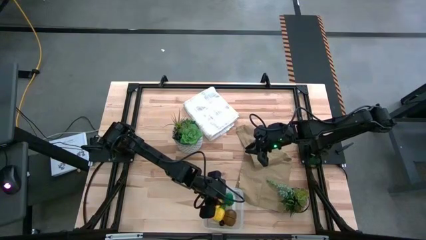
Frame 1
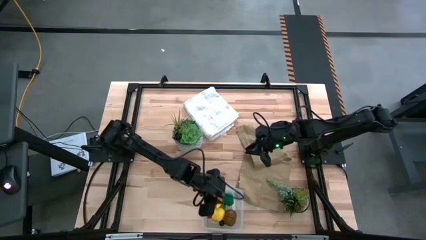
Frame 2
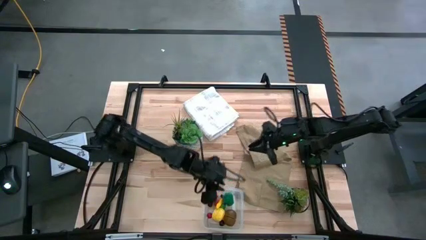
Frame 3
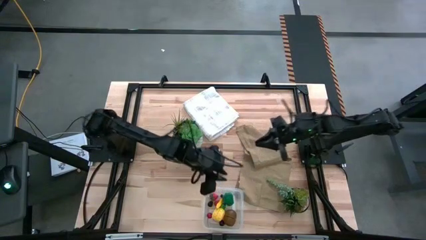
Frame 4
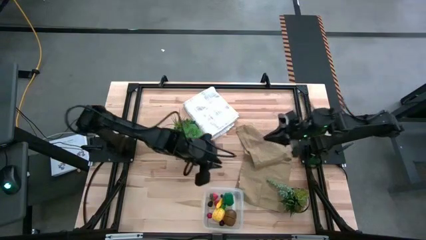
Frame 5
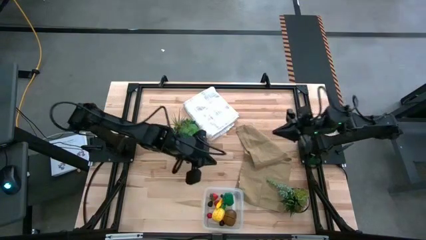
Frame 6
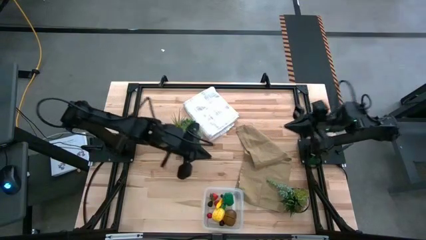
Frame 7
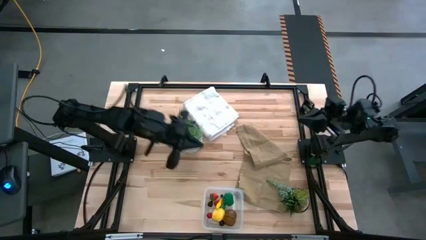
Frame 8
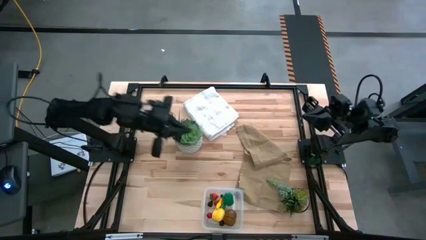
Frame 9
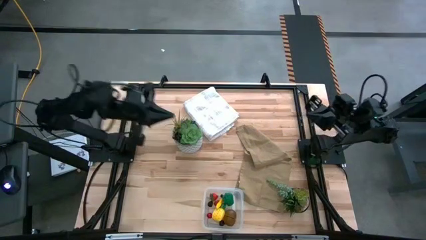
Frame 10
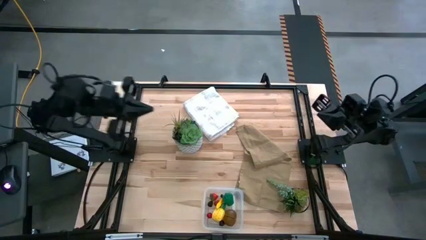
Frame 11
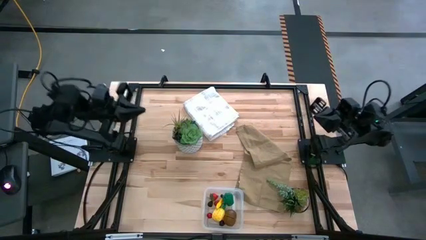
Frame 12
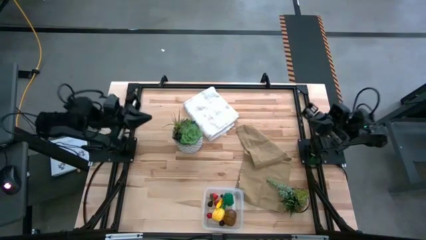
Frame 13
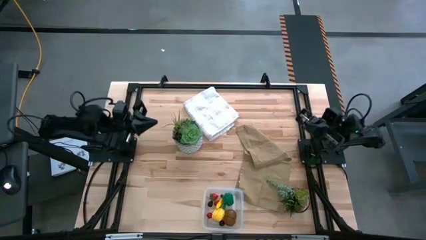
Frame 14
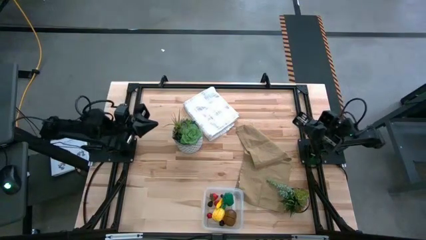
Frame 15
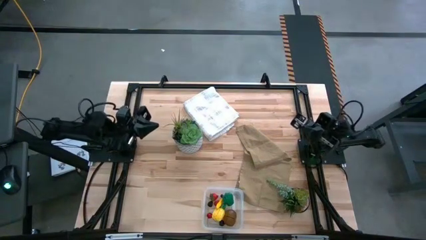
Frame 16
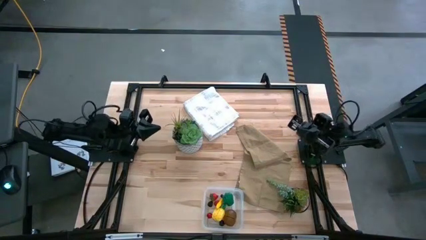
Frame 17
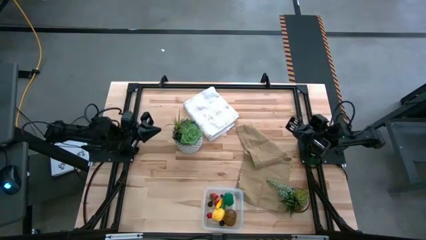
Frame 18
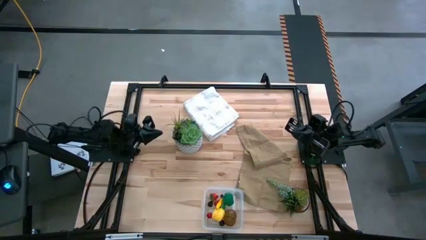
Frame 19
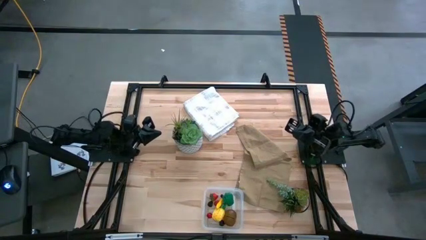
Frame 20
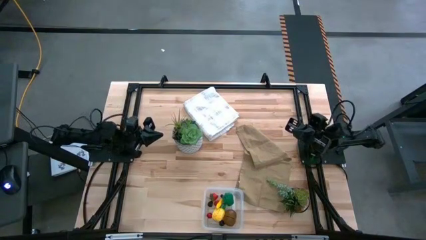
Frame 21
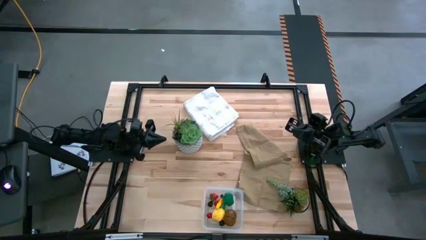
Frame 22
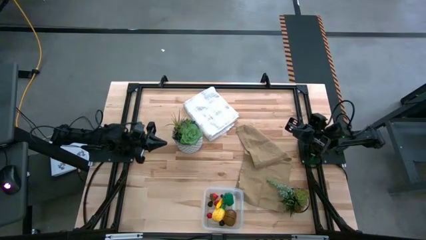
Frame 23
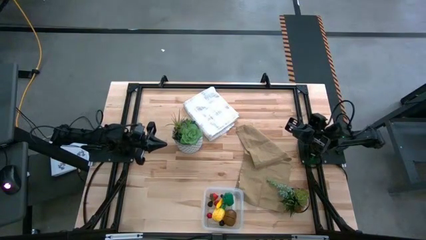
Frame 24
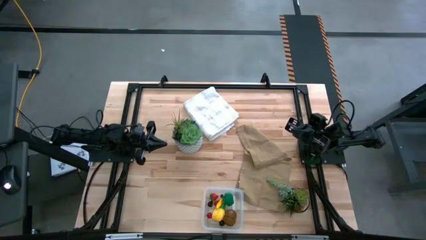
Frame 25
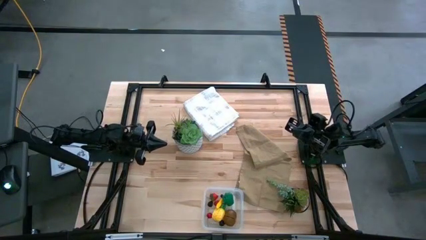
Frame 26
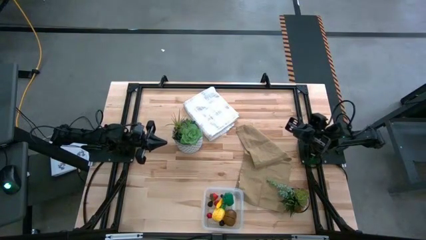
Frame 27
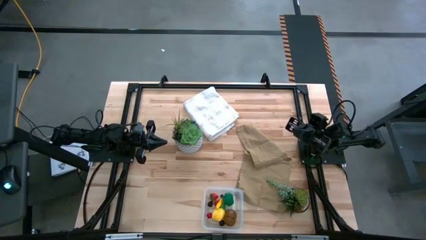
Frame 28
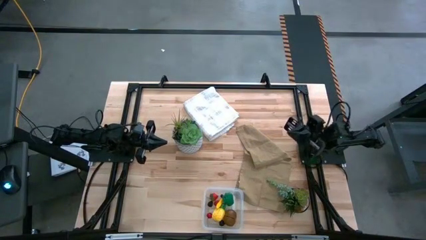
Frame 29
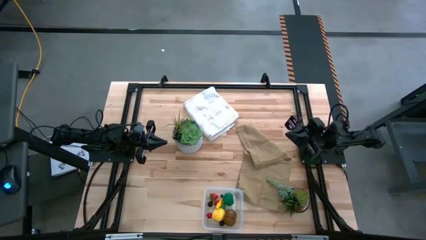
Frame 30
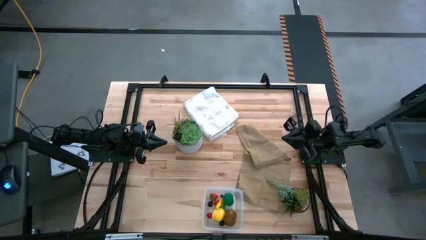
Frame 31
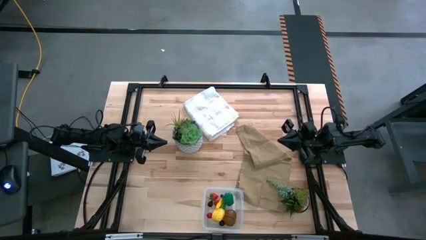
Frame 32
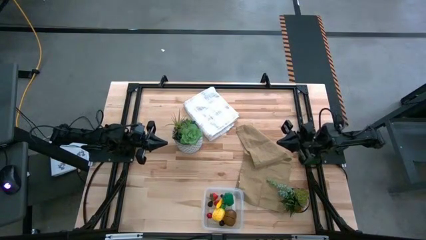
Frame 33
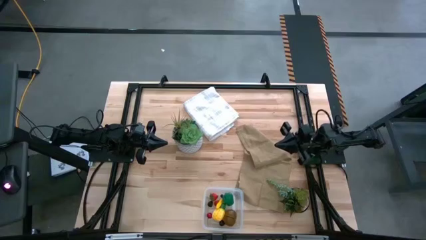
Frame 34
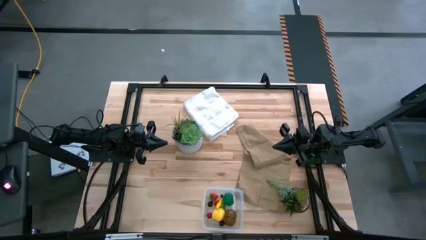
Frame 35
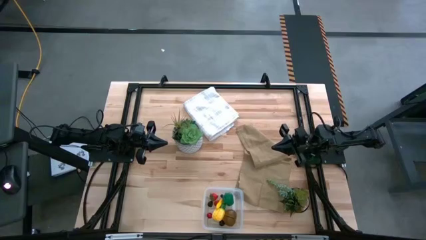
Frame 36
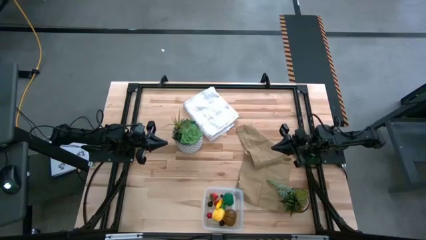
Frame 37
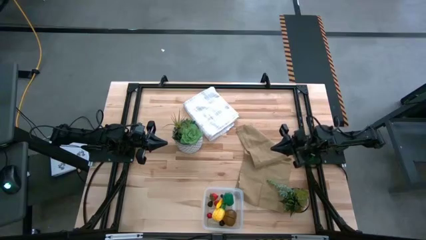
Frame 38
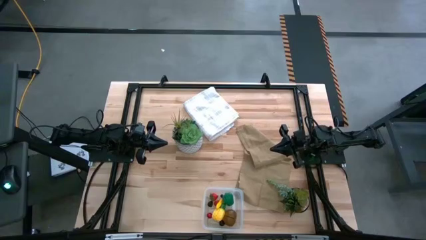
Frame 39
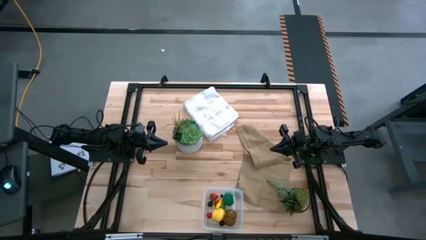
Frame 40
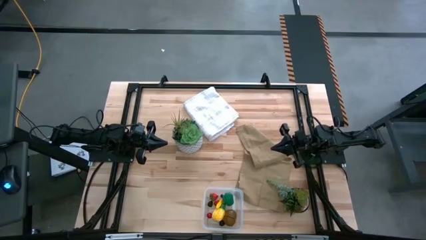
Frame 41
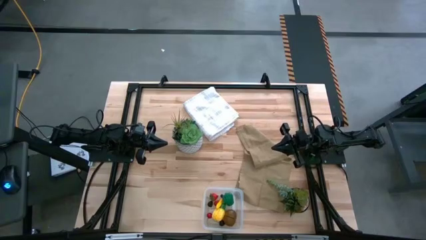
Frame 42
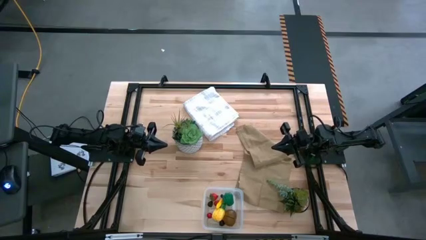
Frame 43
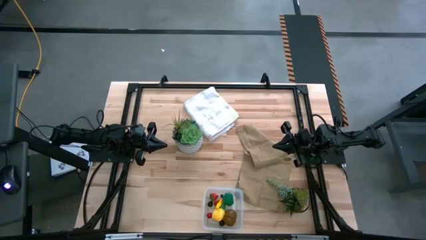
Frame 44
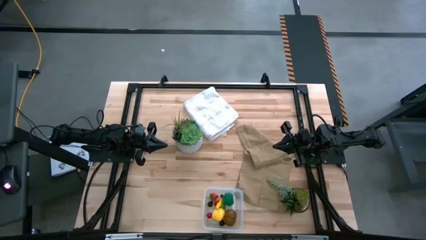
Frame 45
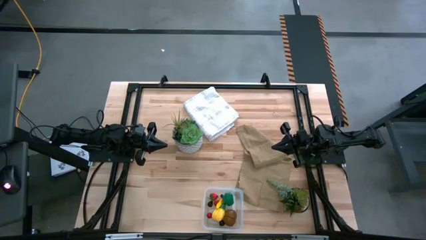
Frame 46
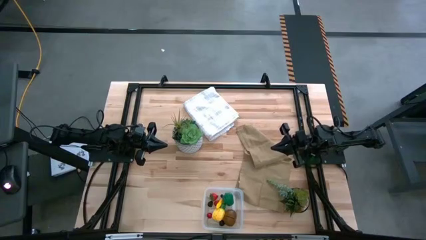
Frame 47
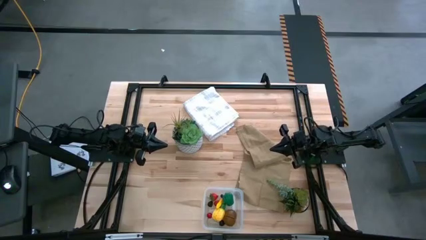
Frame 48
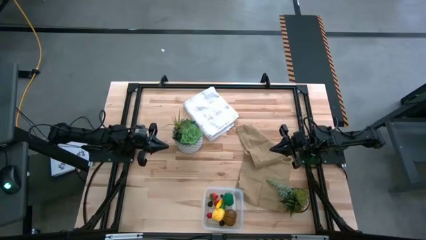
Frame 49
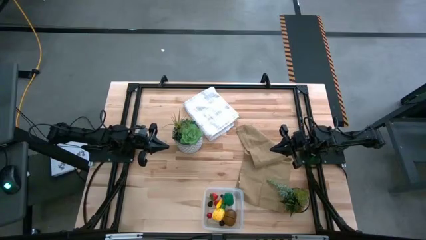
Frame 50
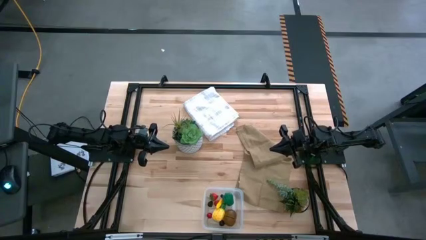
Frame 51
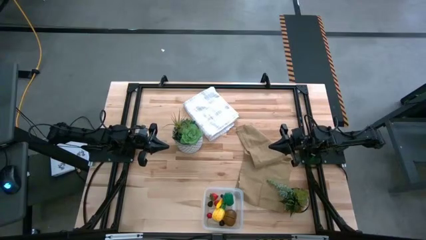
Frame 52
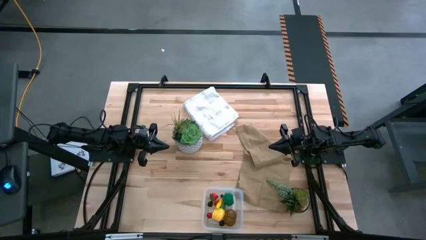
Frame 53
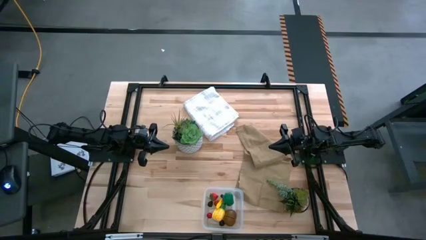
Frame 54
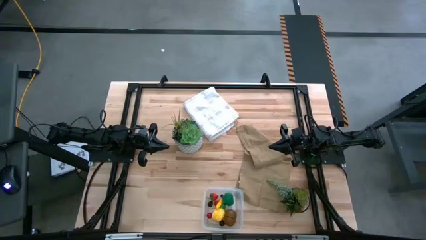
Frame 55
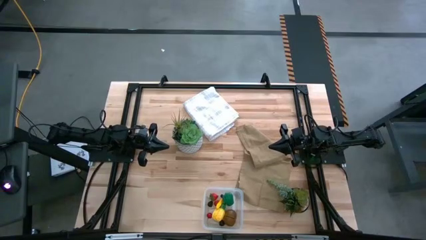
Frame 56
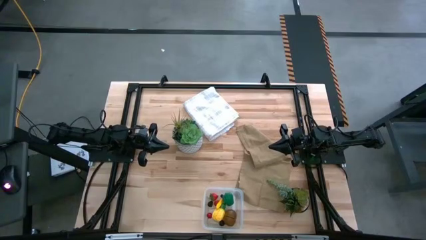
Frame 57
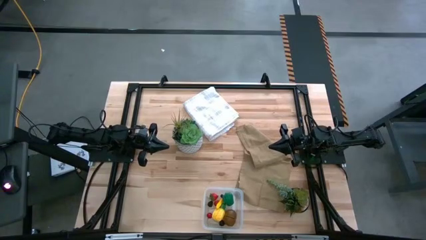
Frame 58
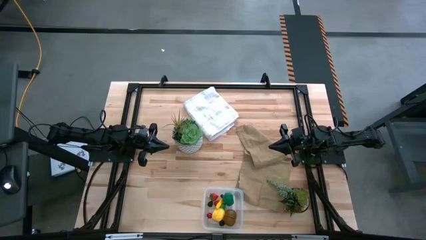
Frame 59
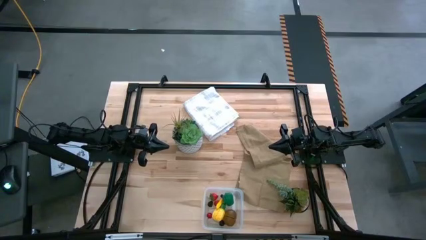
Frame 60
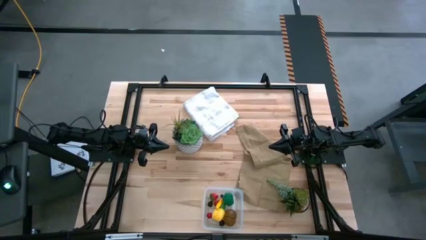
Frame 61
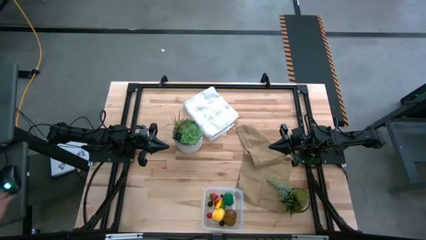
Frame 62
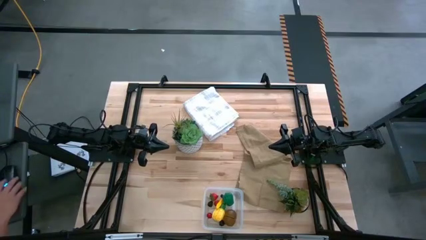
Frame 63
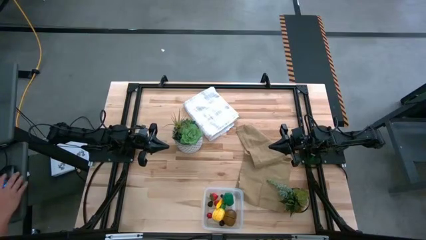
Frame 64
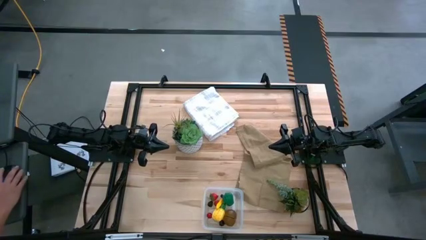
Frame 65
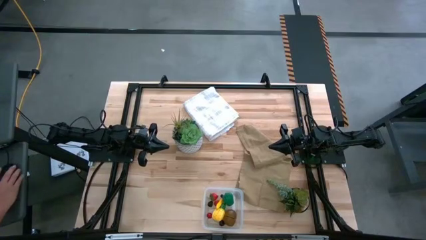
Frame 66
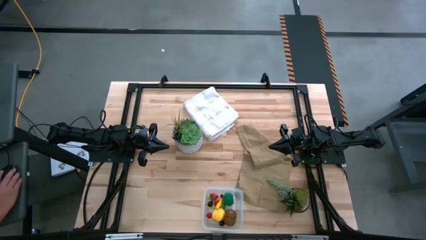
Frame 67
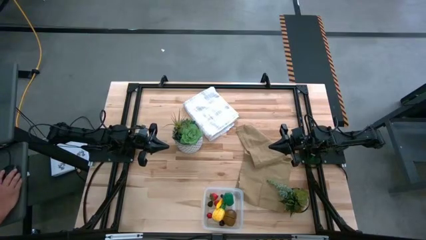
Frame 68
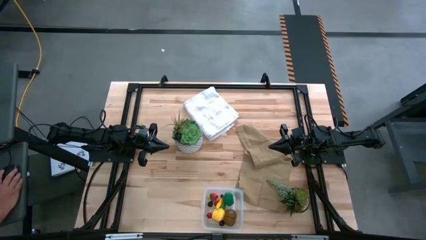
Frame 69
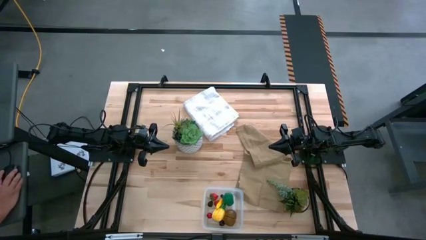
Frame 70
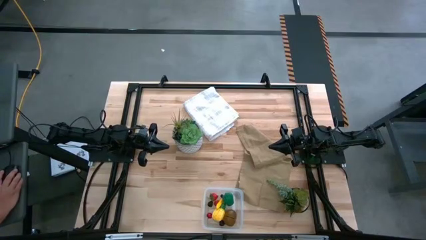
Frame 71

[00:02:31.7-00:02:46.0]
Task: Pick and placing Produce into tupperware
Return to Home Position

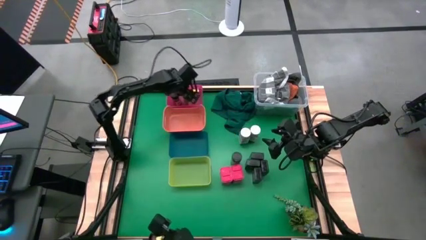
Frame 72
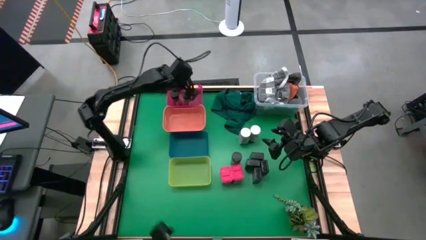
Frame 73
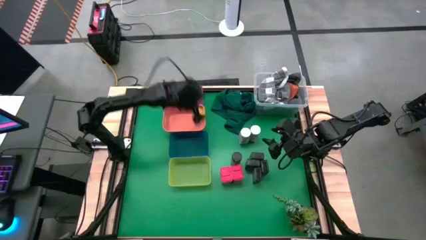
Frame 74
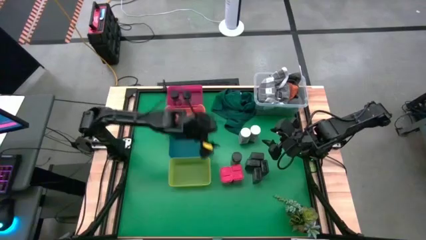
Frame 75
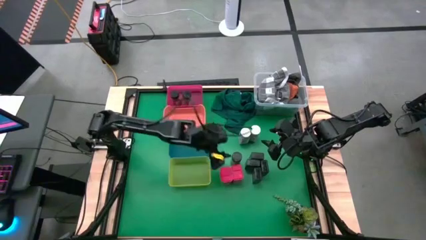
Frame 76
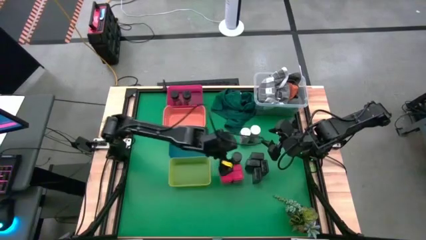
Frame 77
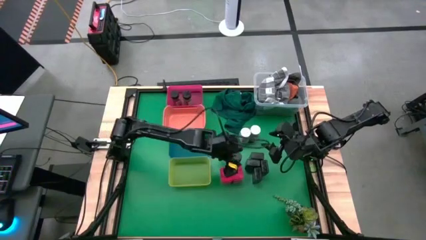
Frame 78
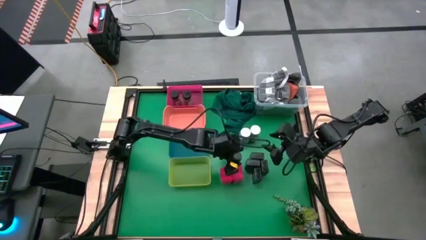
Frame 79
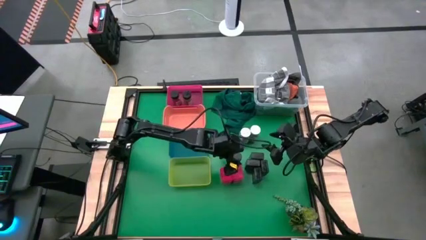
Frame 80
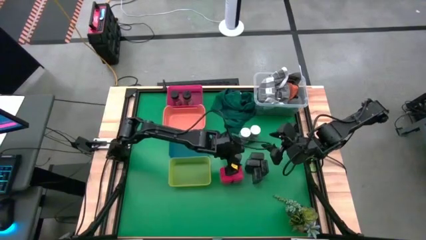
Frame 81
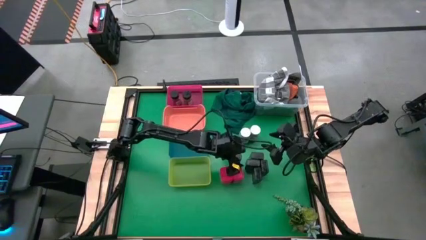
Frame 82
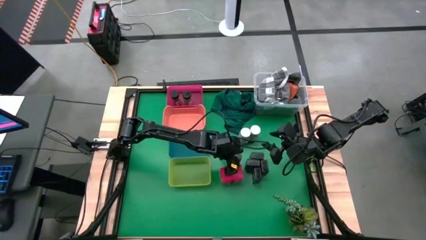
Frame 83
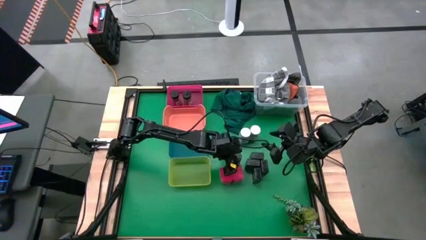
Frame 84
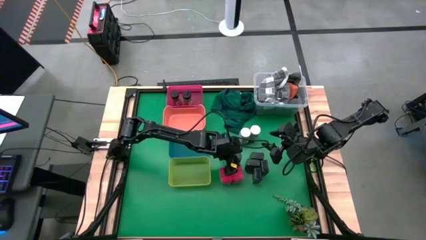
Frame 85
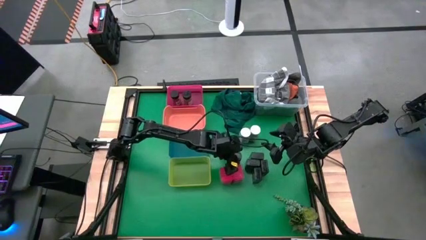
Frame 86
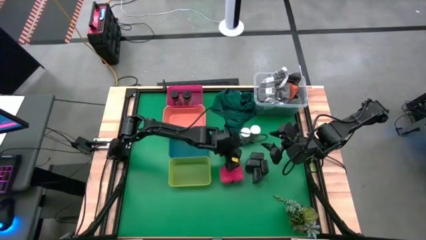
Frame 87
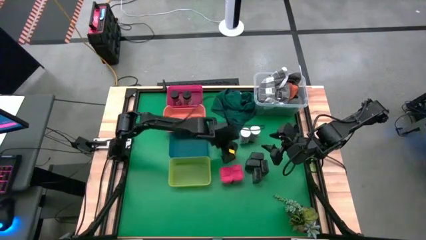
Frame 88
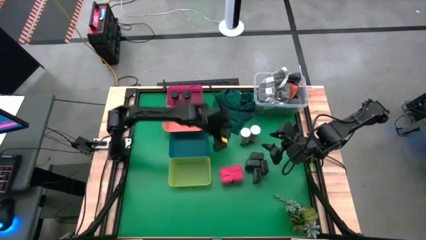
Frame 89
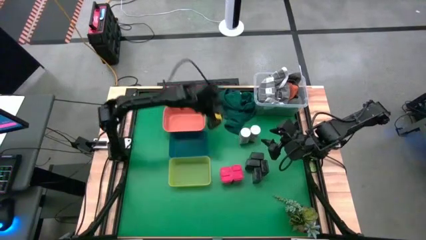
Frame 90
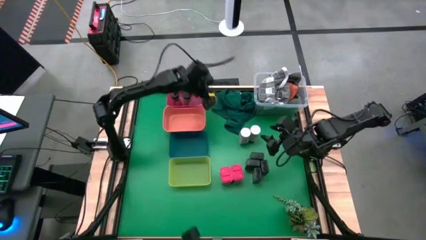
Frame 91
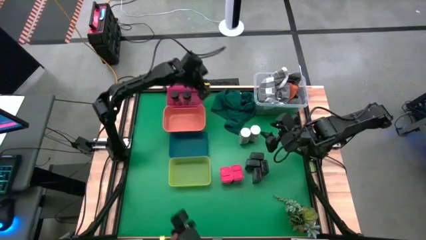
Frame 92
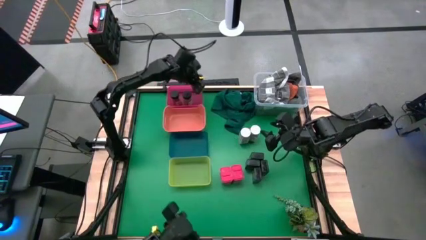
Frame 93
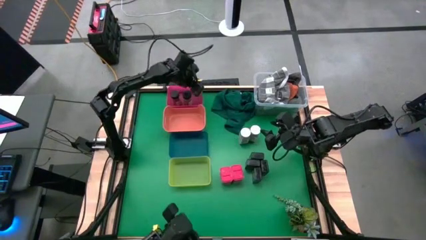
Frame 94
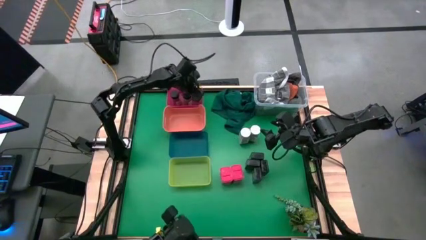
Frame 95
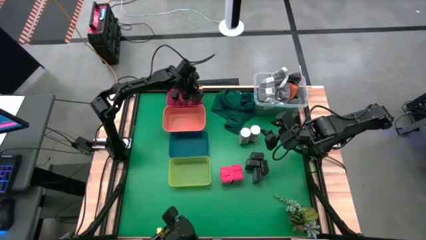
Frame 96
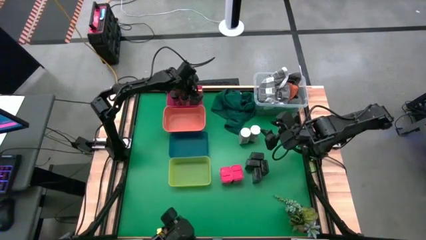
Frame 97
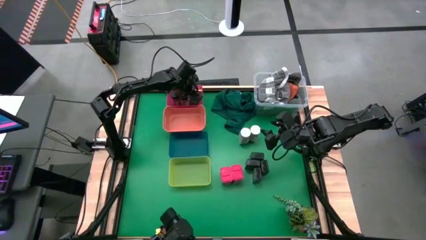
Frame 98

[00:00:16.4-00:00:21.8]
Task: Sort spices by type
Put the black spice bottle into the pink bin
